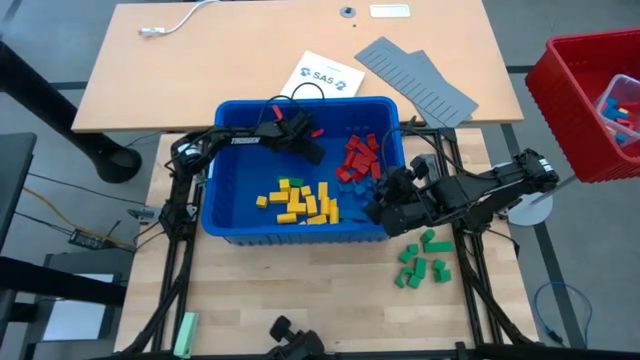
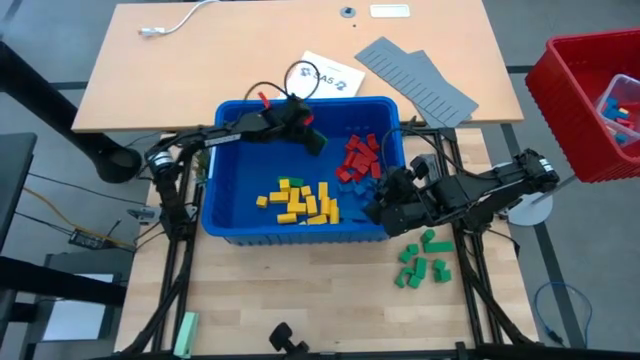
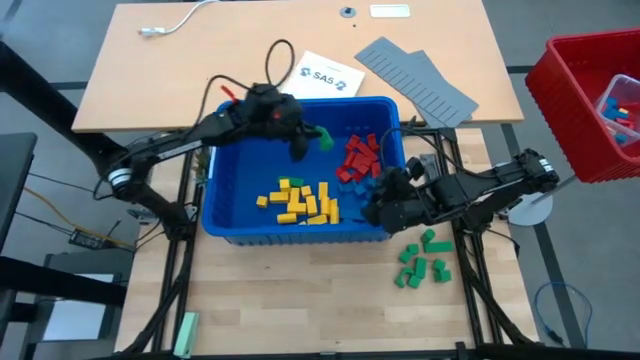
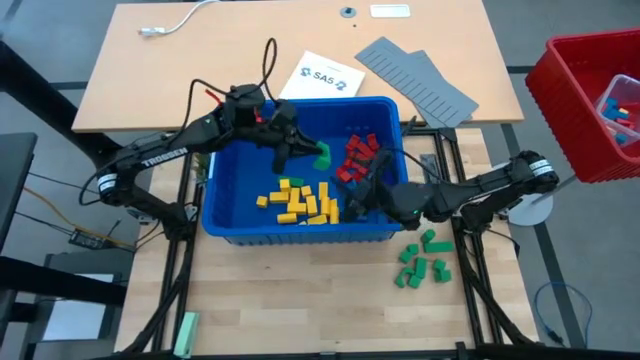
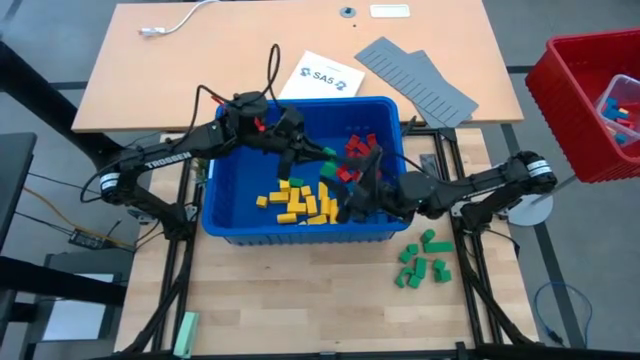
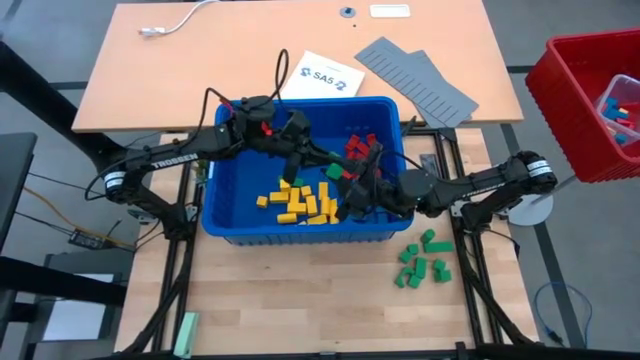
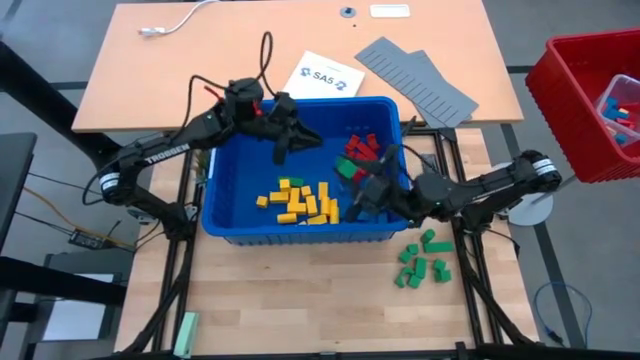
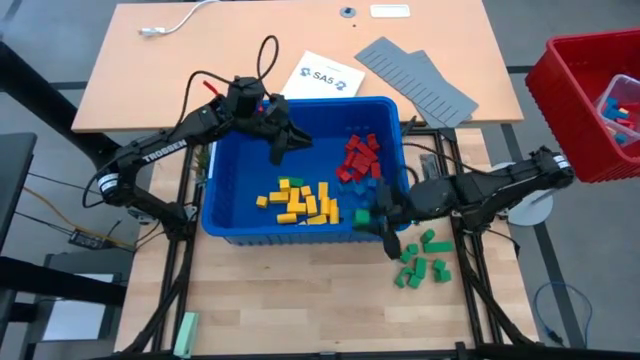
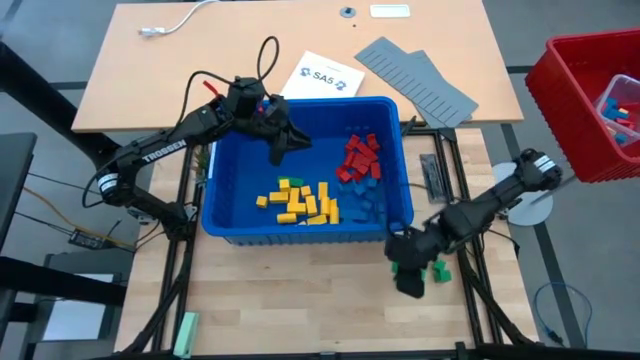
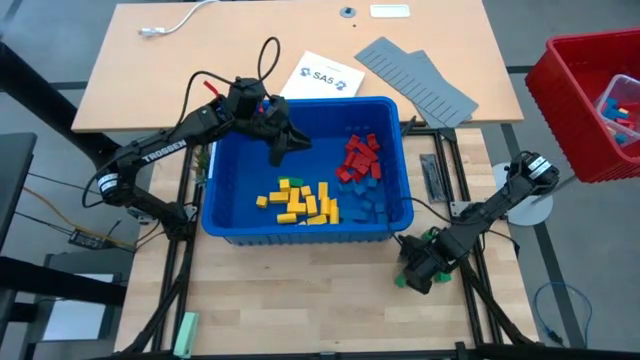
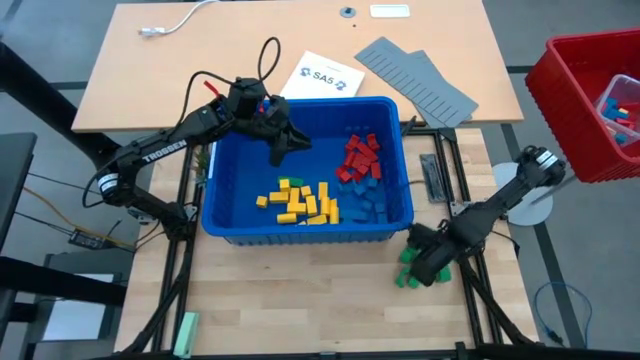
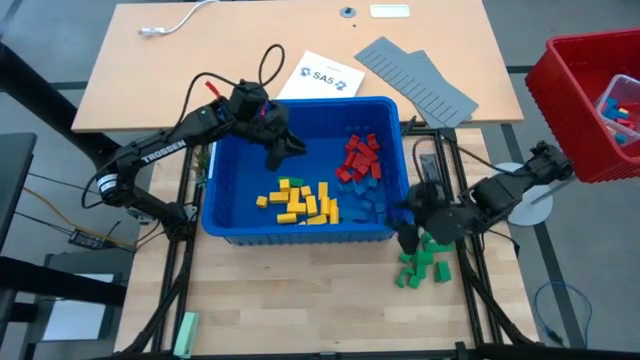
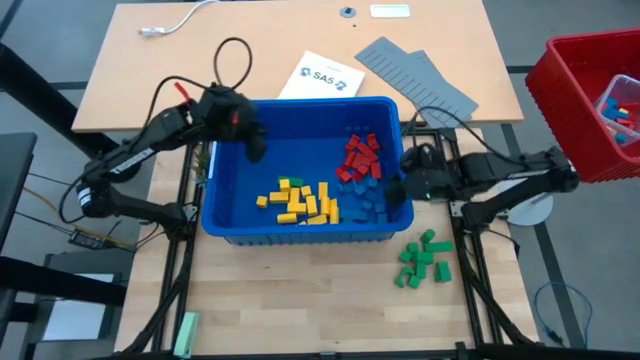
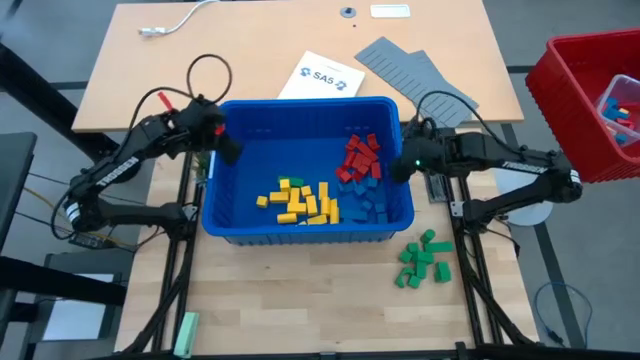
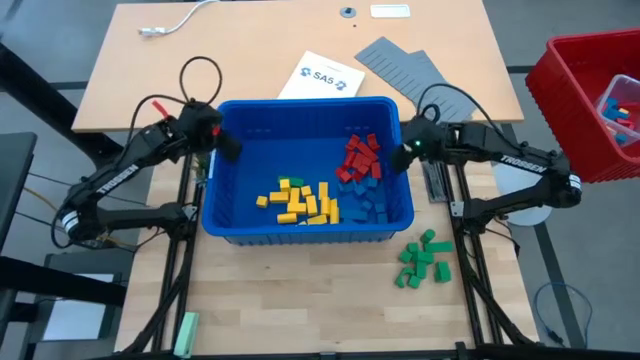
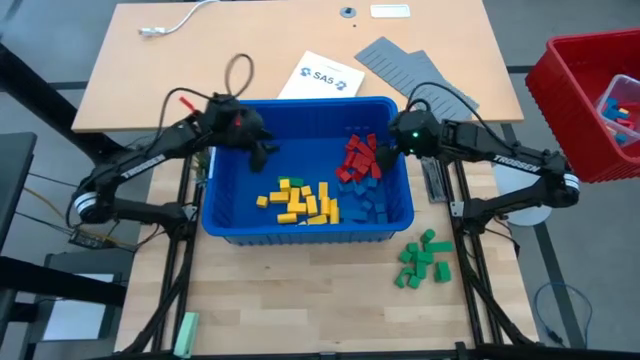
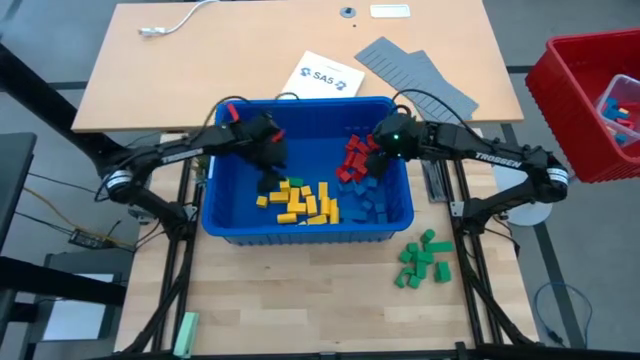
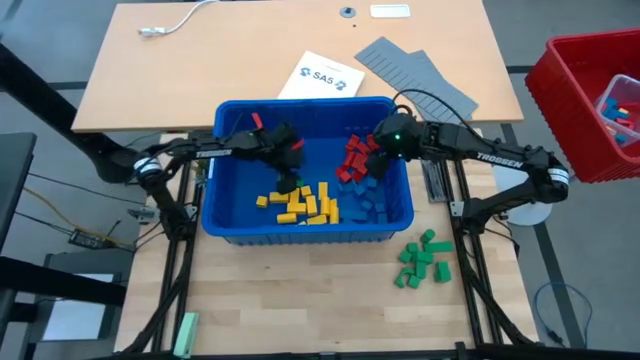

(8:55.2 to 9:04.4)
Task: Sort blocks
Remove the green block from the blue bin

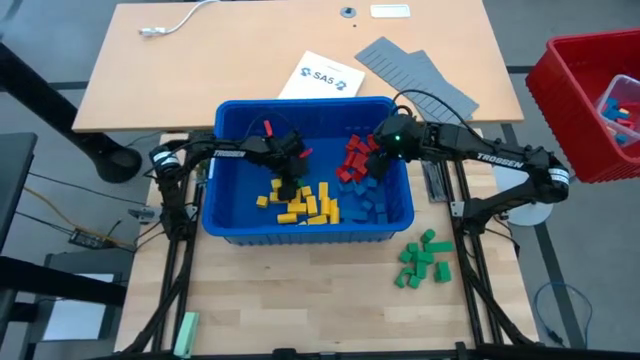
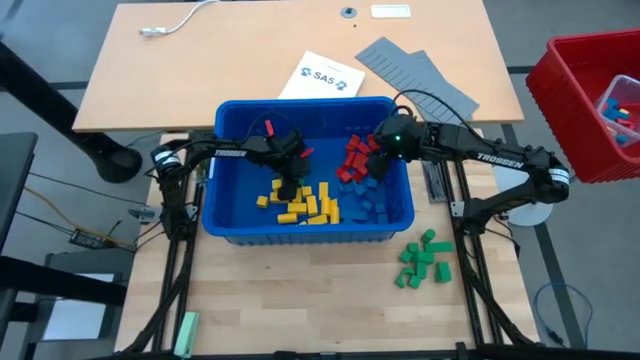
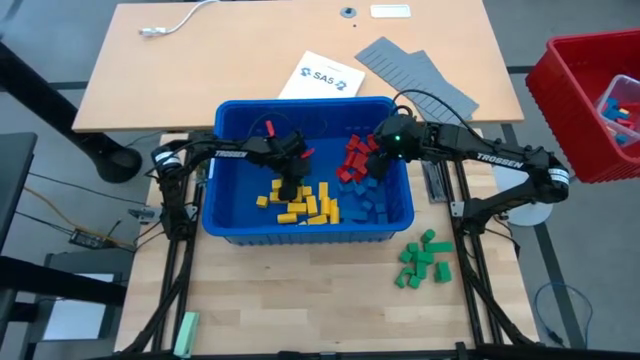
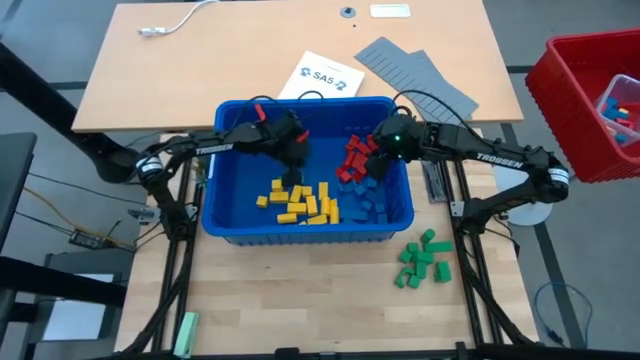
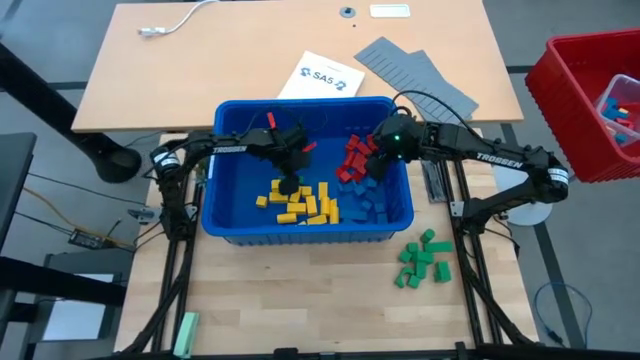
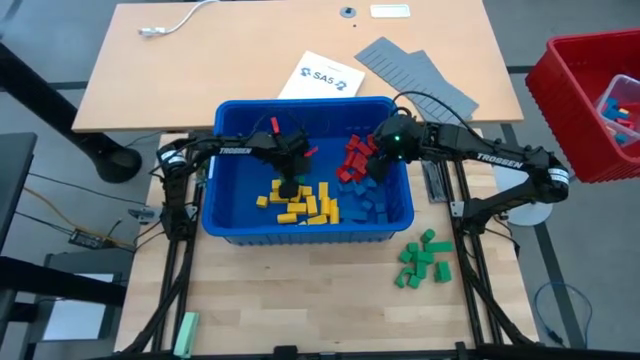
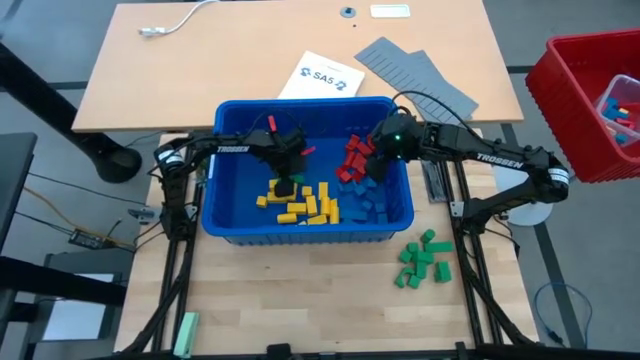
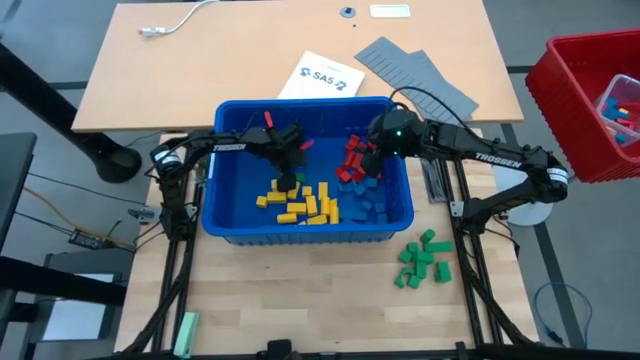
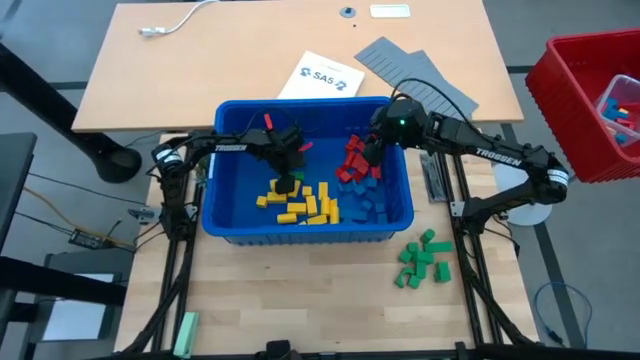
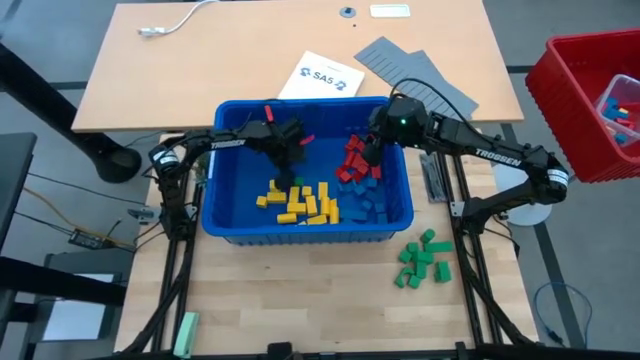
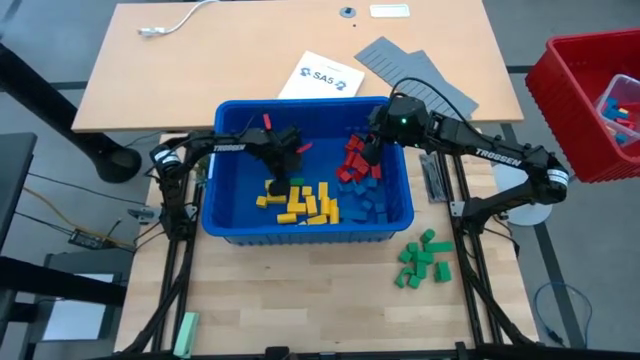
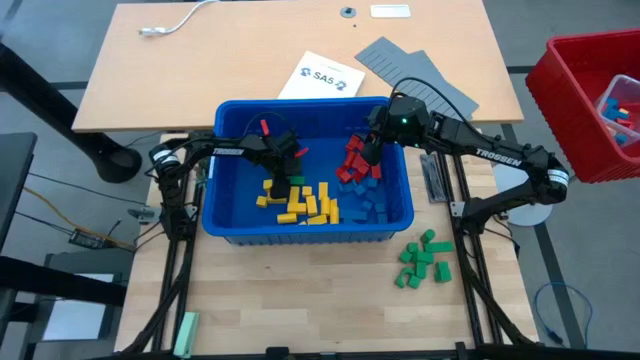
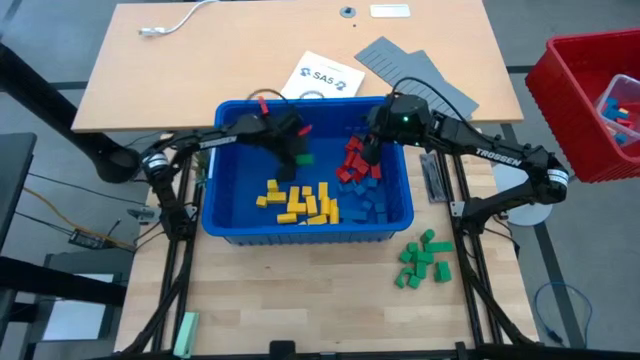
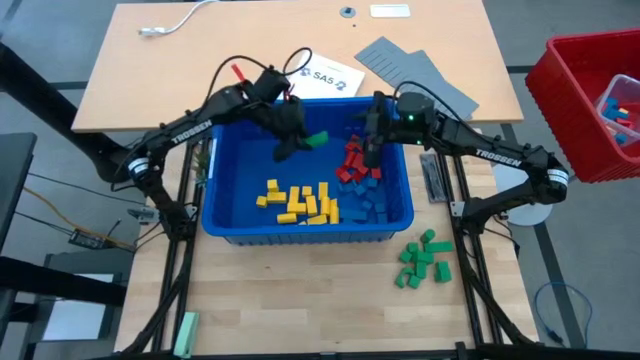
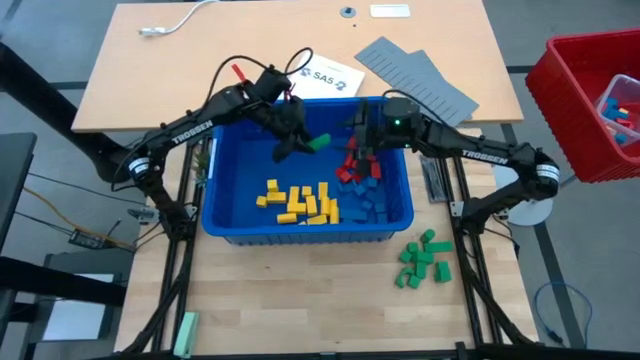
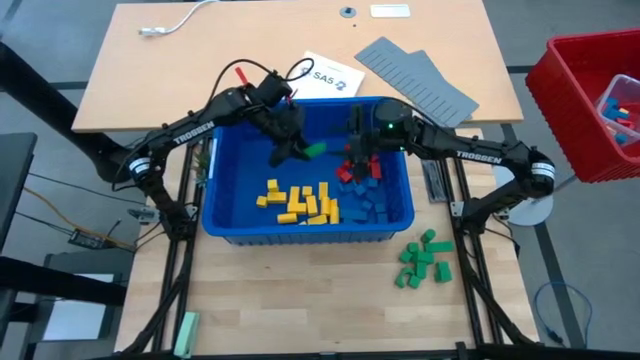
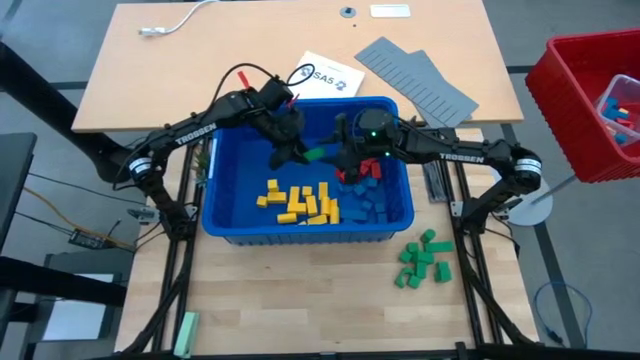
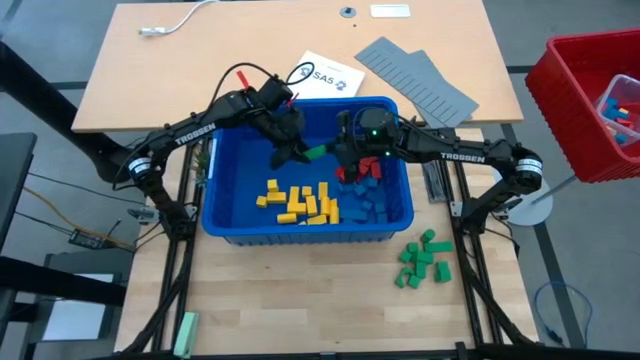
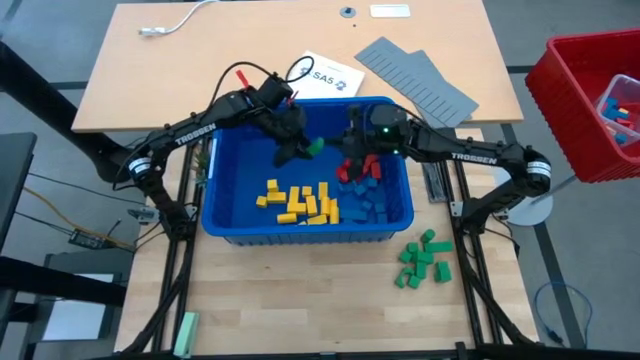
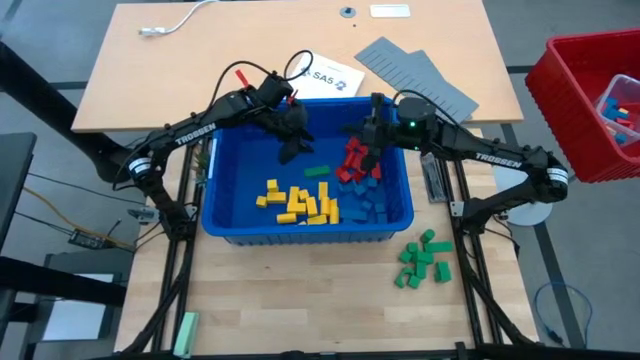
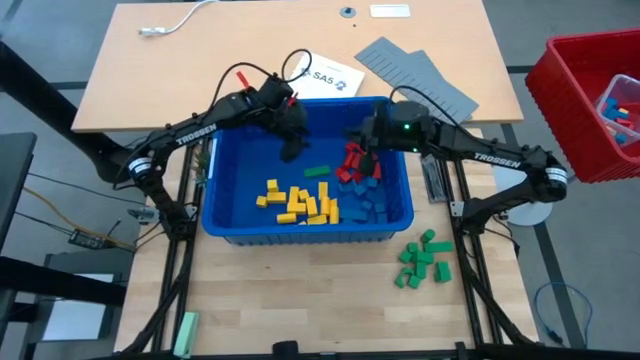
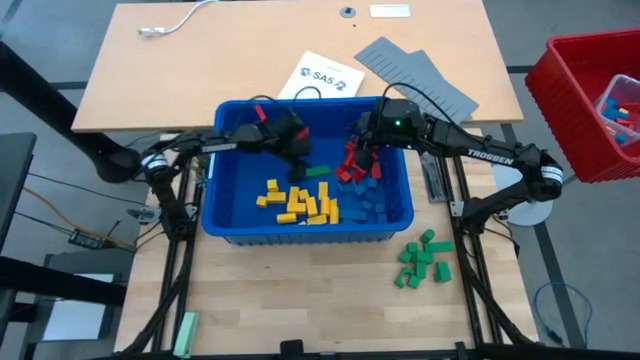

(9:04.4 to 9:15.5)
Remove the green block from the blue bin
